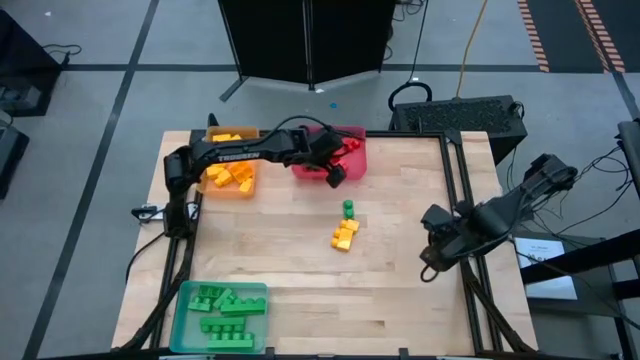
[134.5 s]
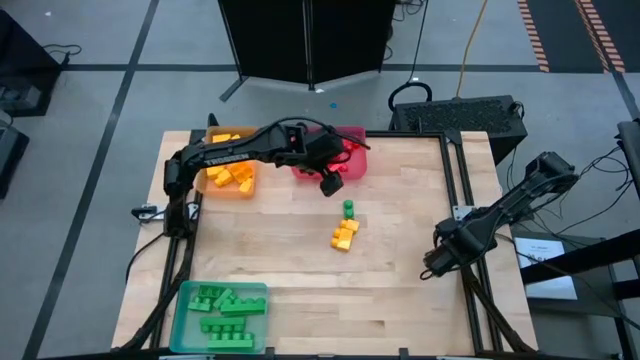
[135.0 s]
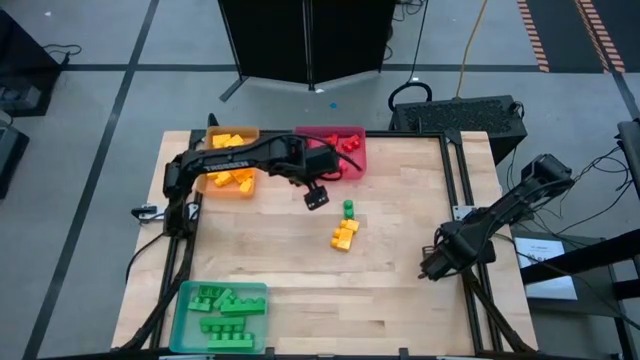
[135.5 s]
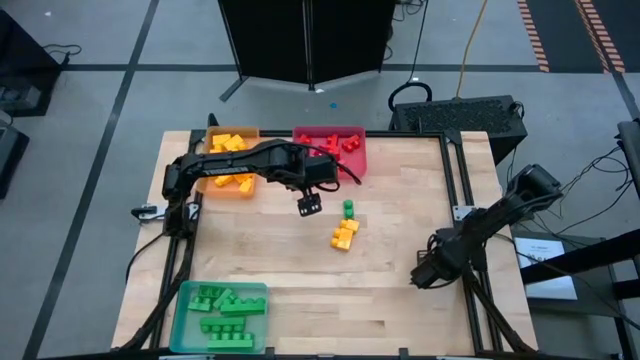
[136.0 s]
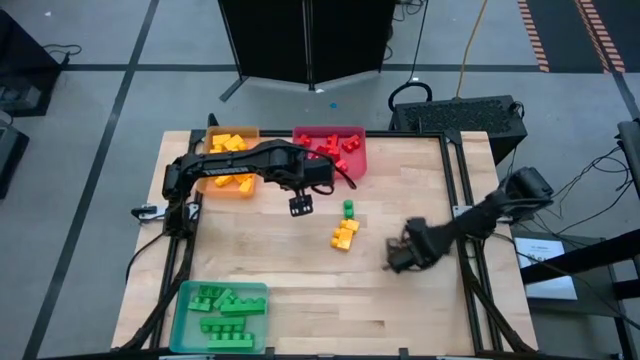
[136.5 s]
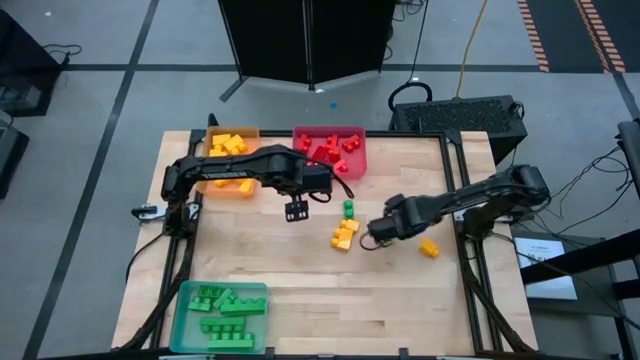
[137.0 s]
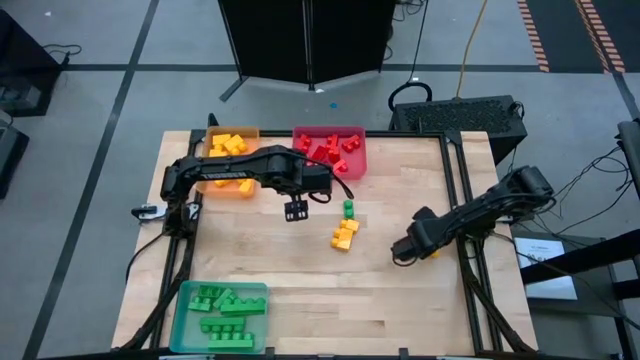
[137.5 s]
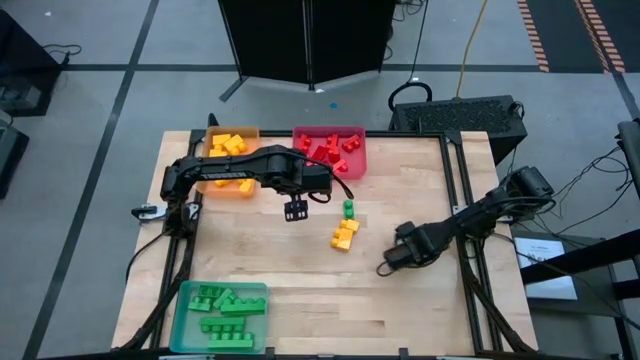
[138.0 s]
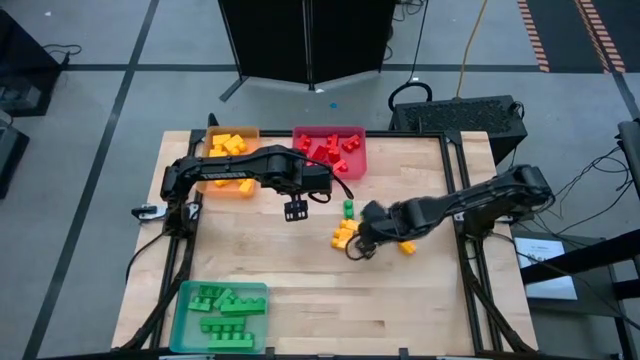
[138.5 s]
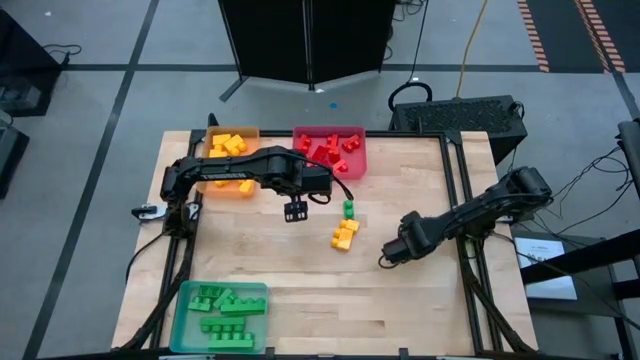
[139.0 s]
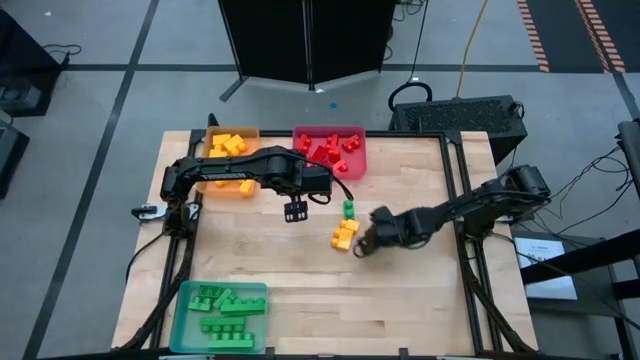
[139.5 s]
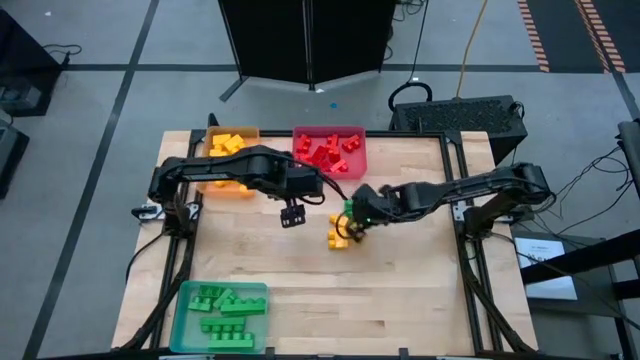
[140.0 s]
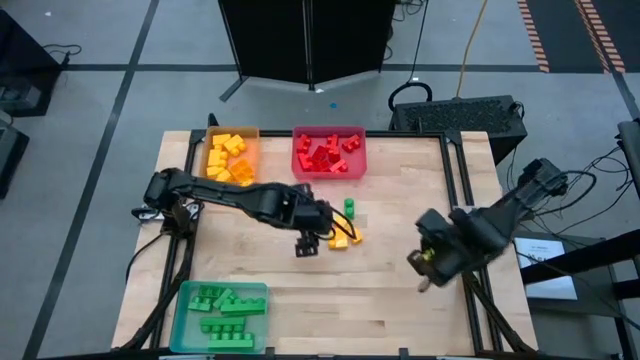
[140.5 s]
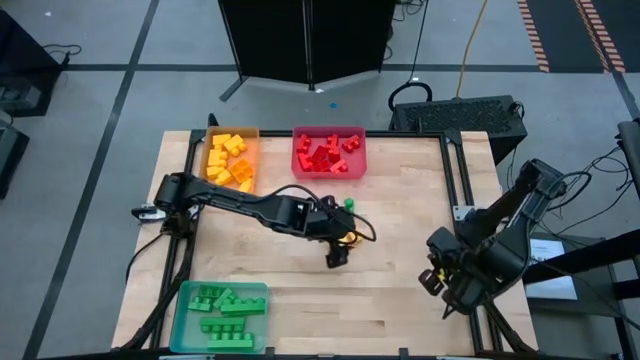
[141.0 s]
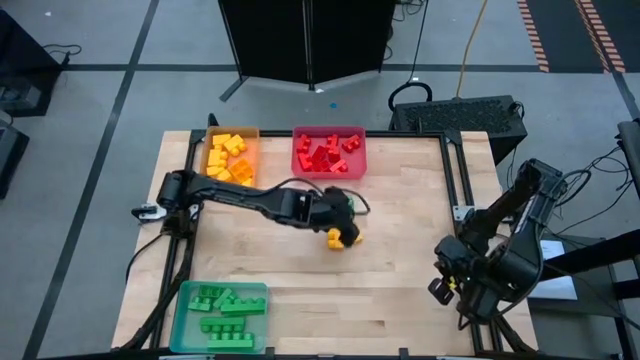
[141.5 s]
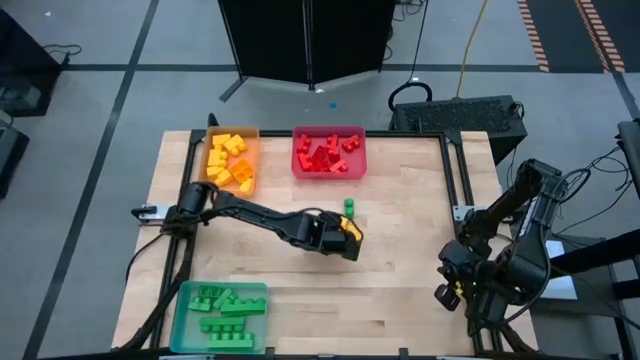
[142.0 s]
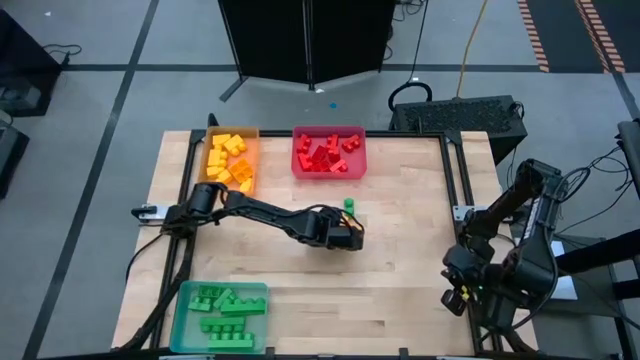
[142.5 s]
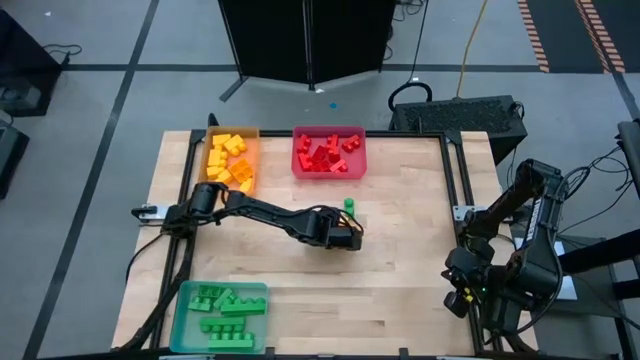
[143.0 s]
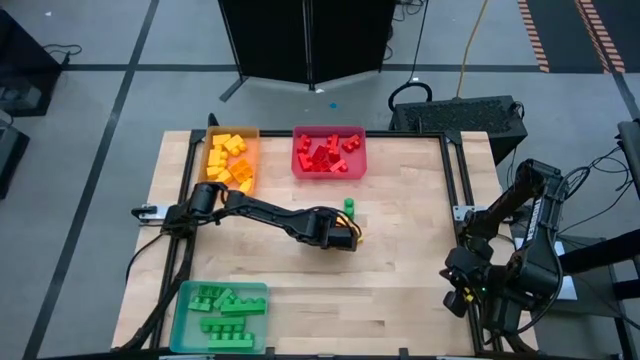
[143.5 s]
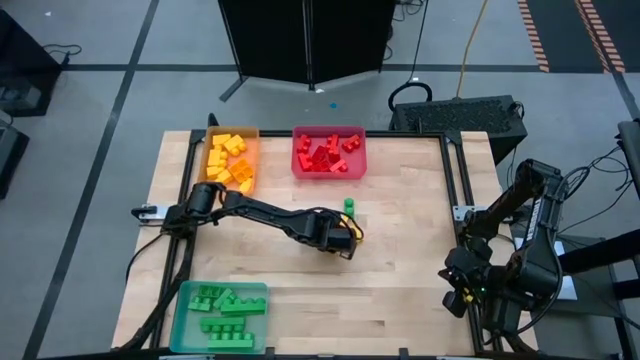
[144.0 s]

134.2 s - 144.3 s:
Task: Sort blocks
Put the yellow game piece into the yellow bin

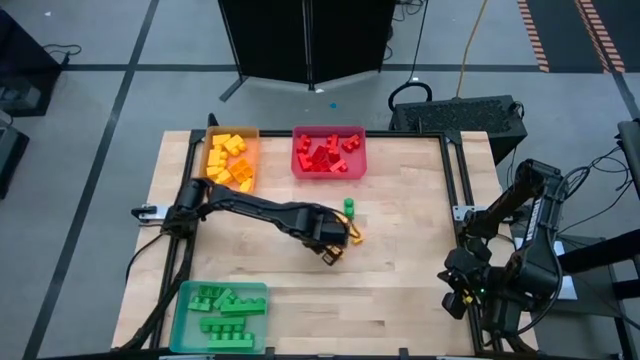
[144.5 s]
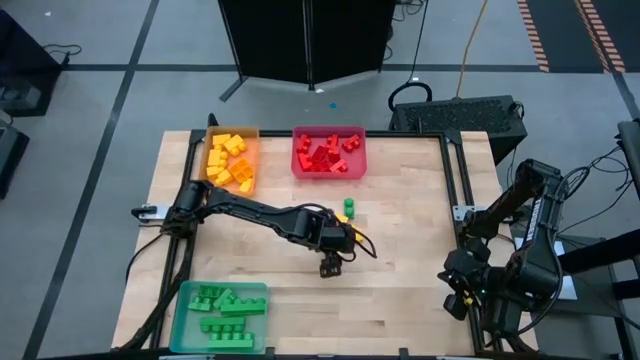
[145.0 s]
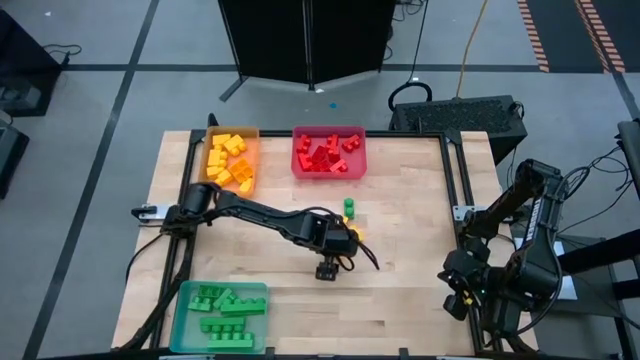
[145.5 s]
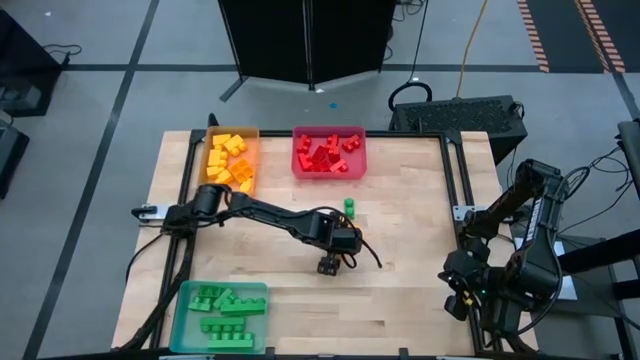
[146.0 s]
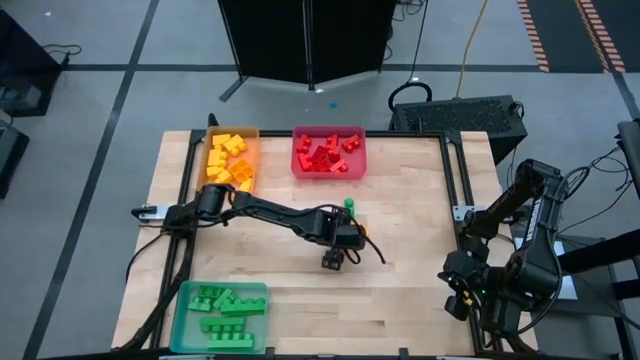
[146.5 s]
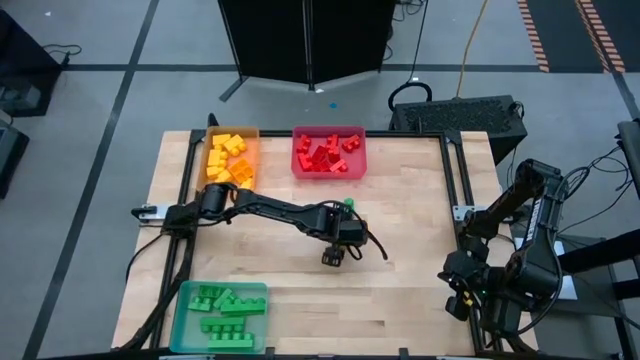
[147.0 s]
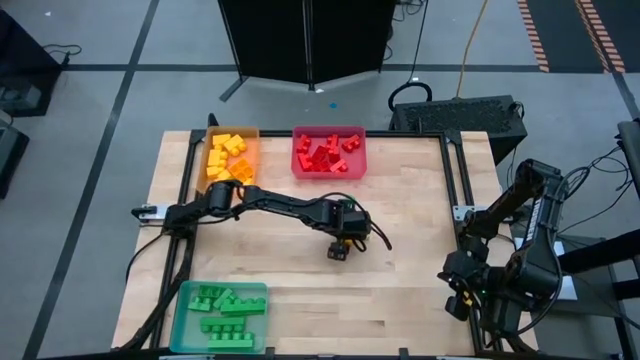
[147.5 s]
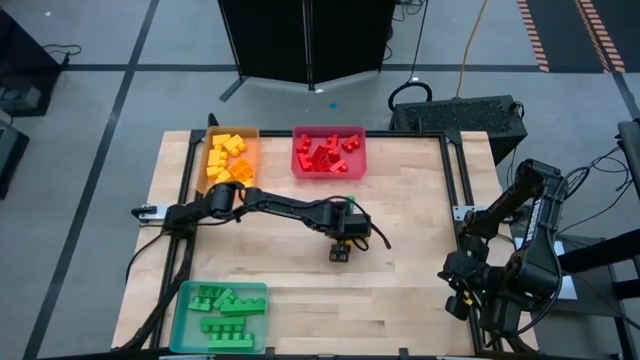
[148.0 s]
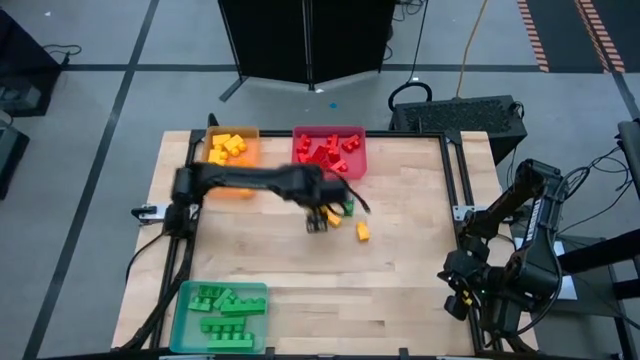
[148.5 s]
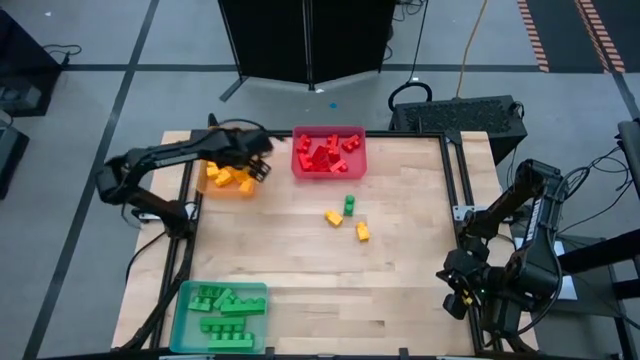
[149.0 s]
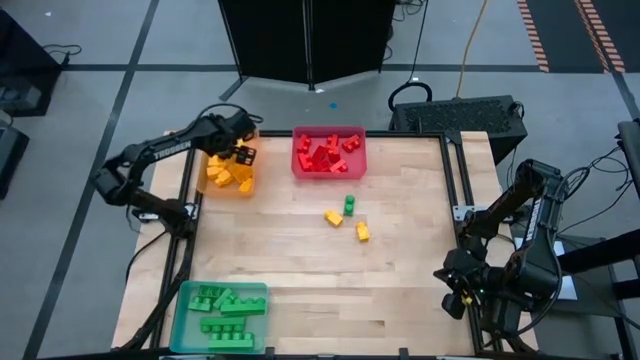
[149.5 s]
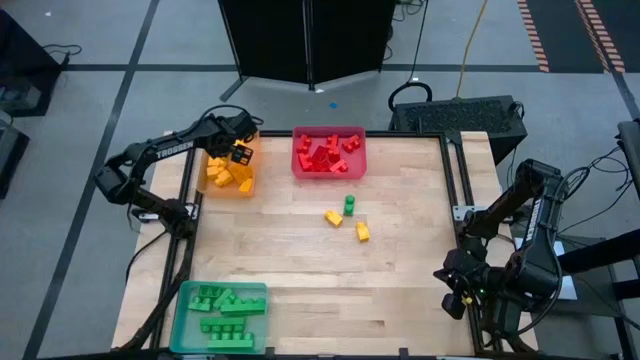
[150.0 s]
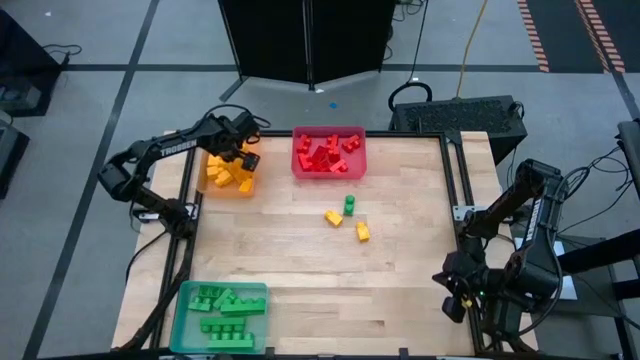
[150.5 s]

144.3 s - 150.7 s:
Put the yellow game piece into the yellow bin

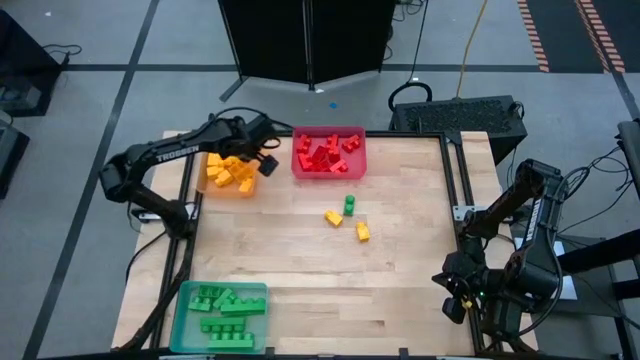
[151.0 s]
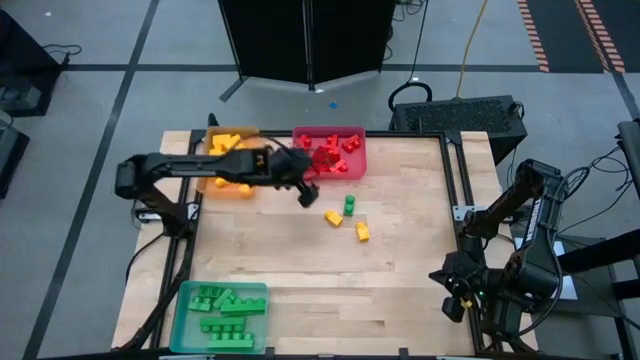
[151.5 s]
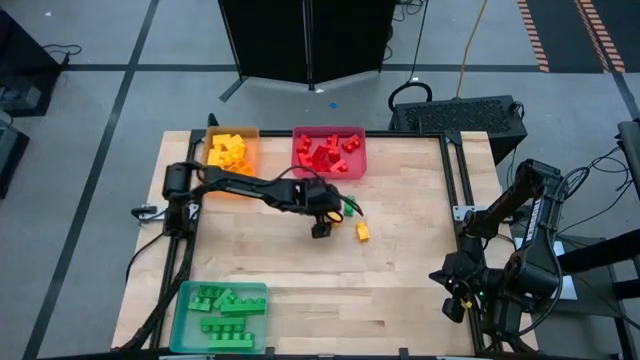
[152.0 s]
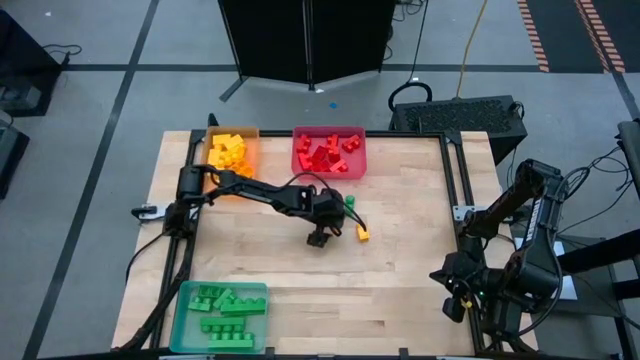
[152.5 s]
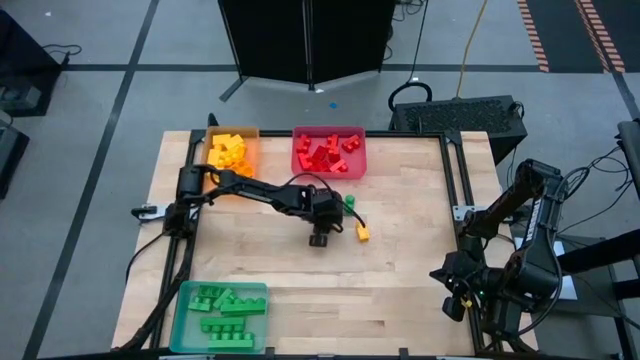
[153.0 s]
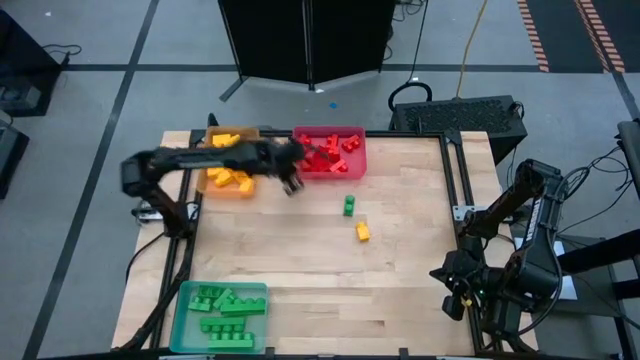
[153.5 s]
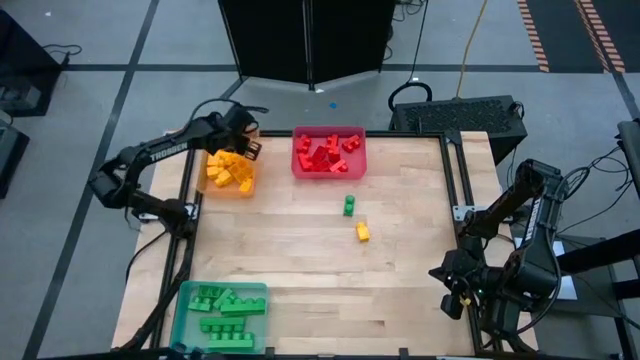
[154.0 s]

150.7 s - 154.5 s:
Put the yellow game piece into the yellow bin

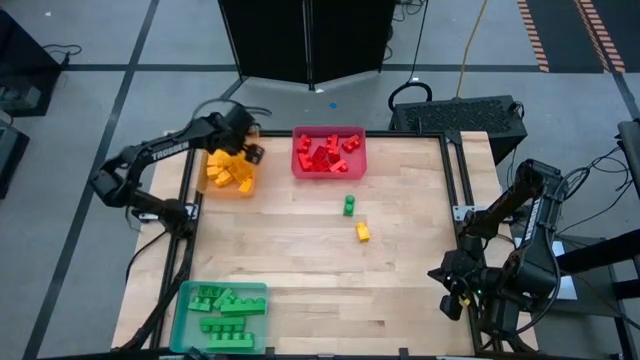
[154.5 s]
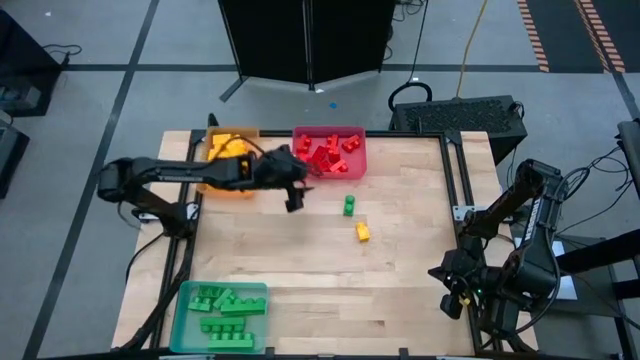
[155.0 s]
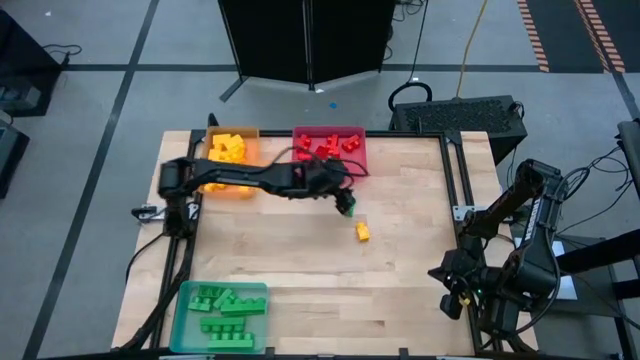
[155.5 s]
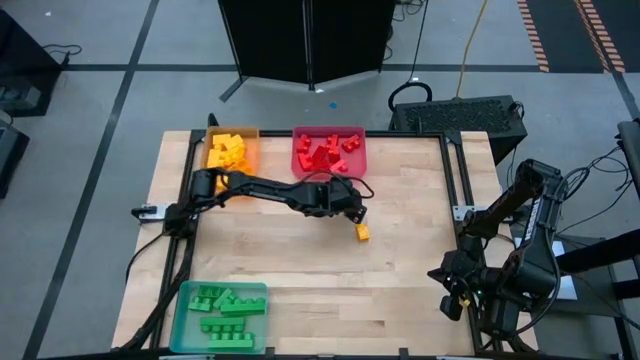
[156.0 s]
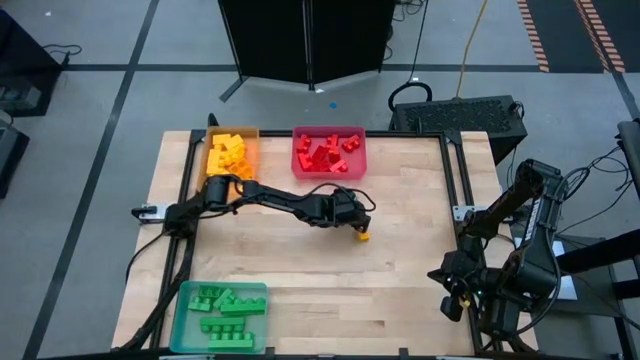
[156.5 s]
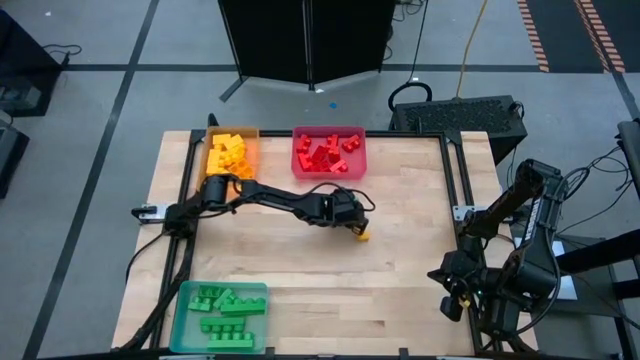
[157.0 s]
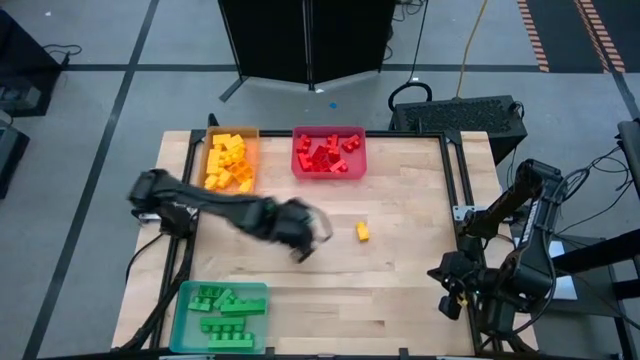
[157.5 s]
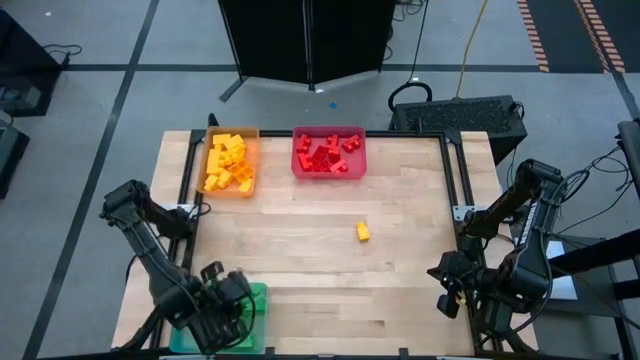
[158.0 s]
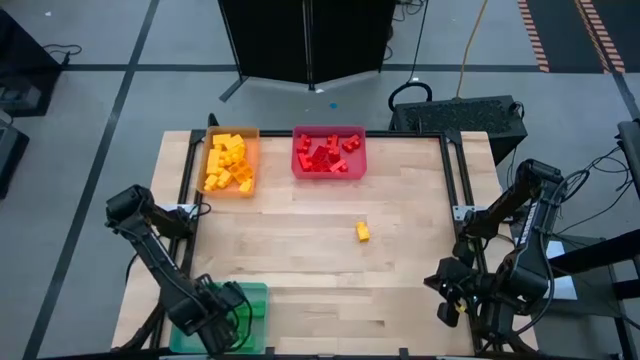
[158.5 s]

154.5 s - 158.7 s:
Put the green game piece into the blue bin
